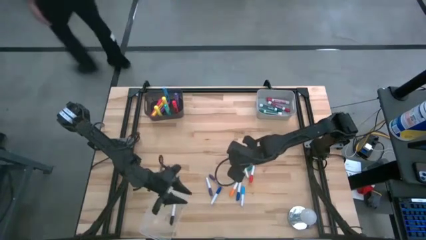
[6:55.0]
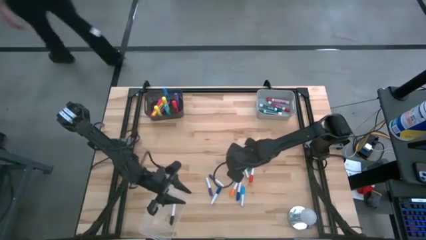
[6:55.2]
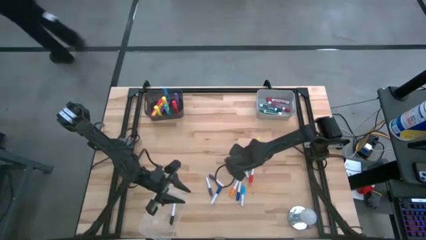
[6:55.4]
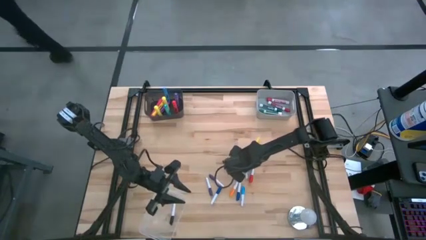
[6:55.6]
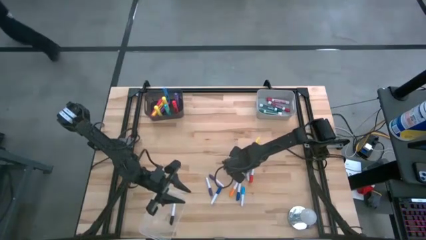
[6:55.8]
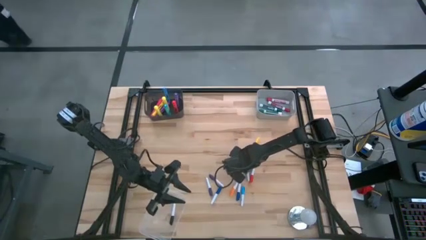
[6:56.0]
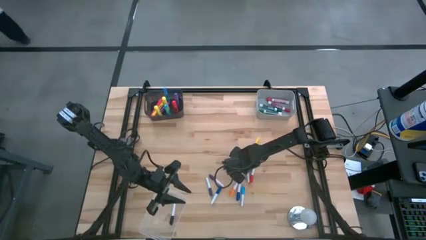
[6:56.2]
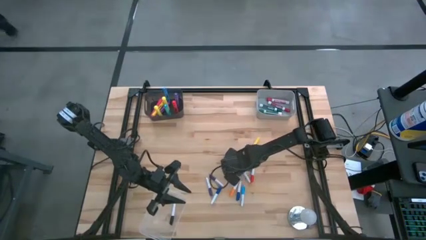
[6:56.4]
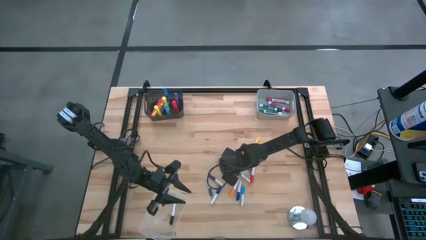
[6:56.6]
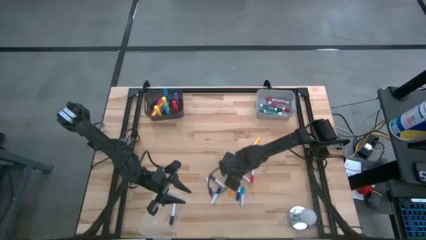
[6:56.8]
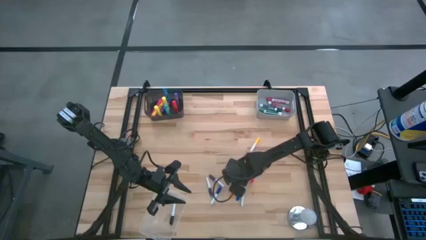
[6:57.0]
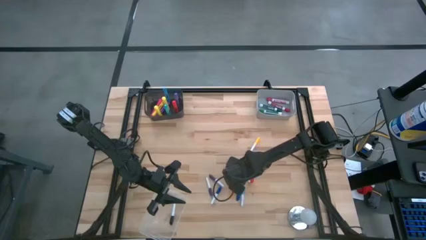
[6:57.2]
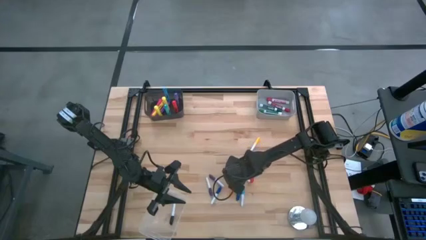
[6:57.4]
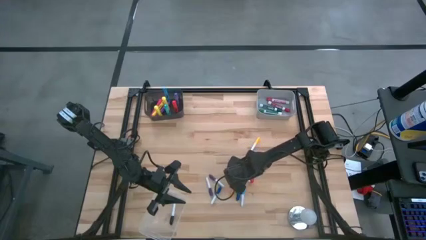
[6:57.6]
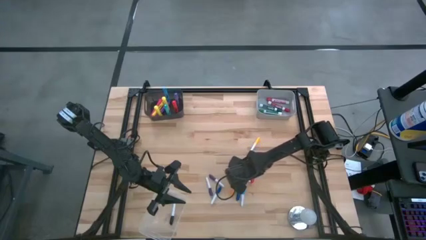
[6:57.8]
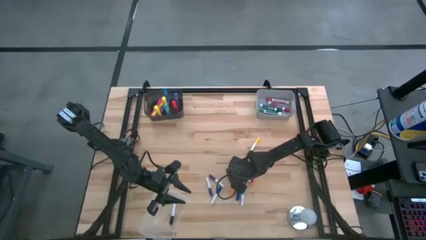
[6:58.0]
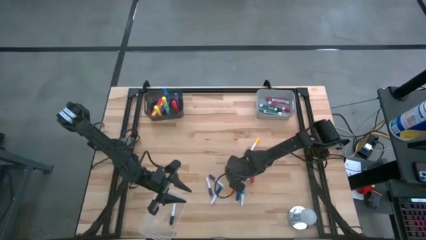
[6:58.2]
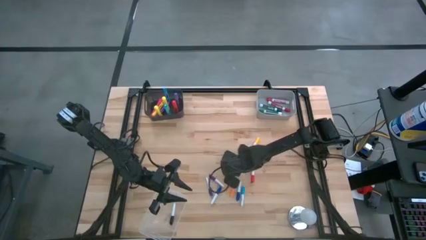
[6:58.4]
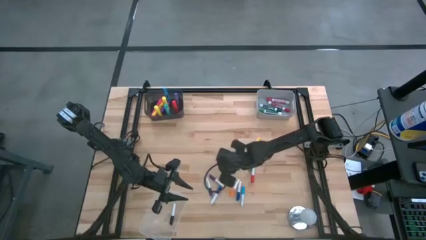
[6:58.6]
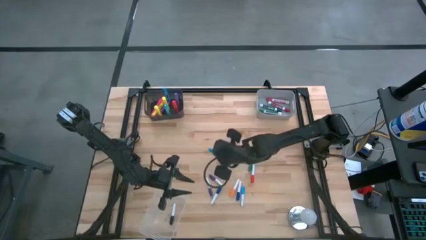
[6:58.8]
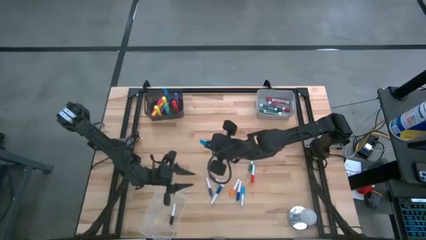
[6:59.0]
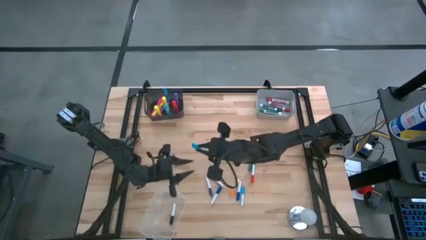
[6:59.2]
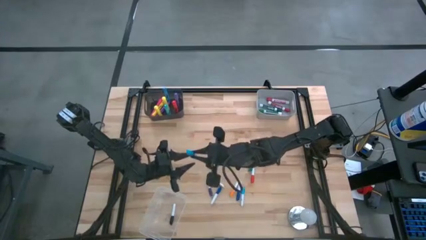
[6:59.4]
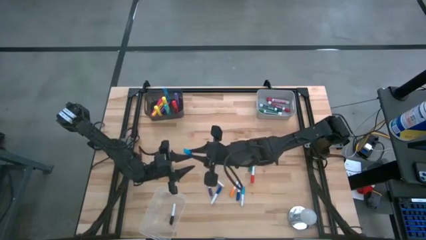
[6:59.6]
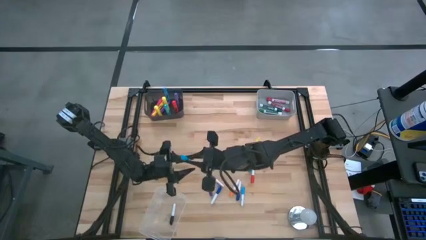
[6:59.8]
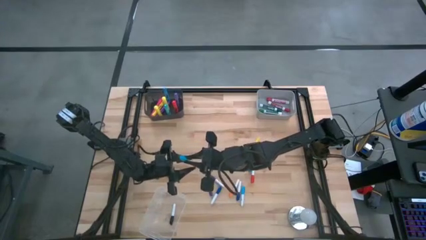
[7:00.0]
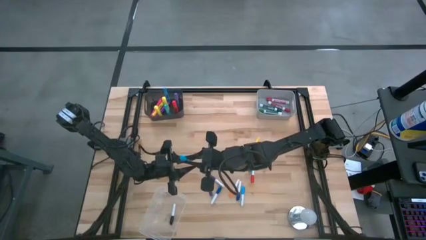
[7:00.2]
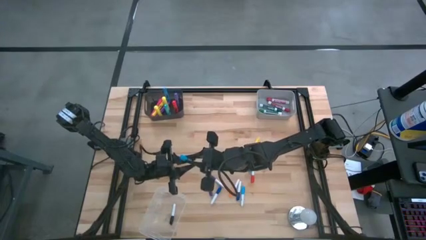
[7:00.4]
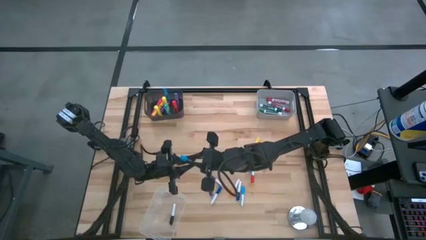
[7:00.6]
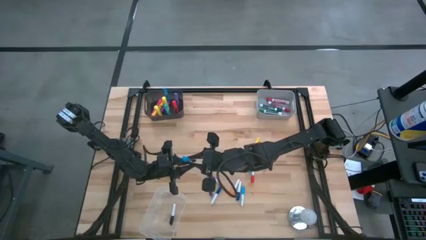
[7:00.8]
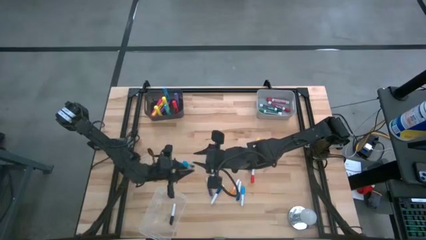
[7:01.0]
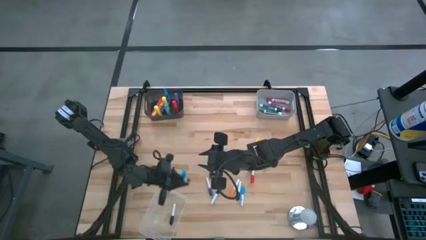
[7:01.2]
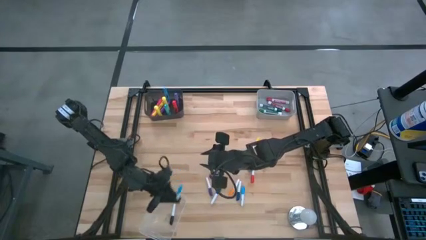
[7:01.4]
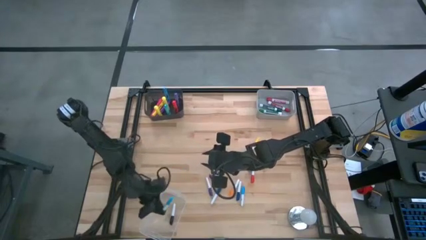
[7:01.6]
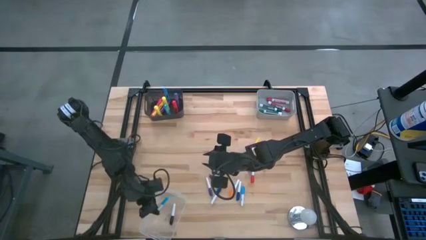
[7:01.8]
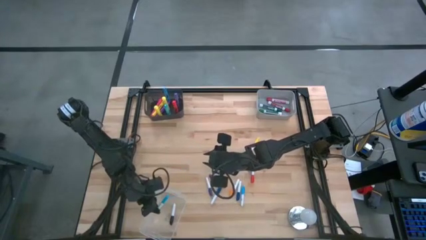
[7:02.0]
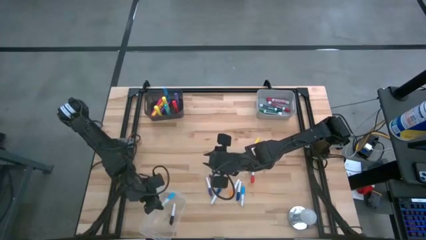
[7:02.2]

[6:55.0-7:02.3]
Task: Pick & Place Markers
Put the light blue and white highlighter pen into the transparent bin

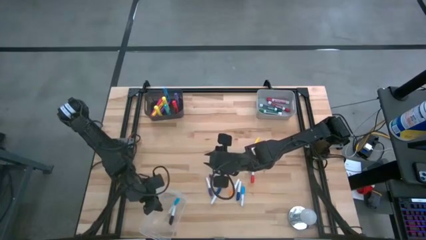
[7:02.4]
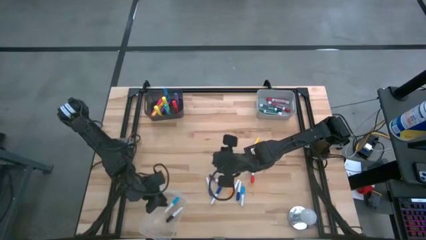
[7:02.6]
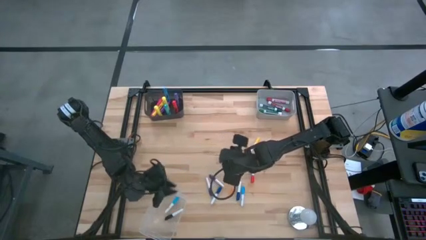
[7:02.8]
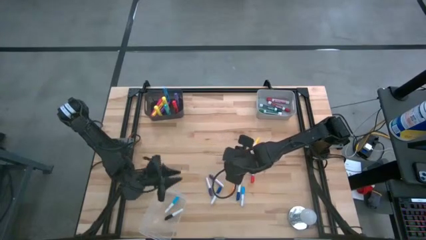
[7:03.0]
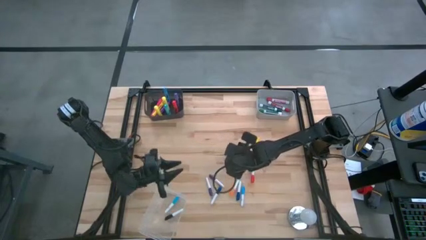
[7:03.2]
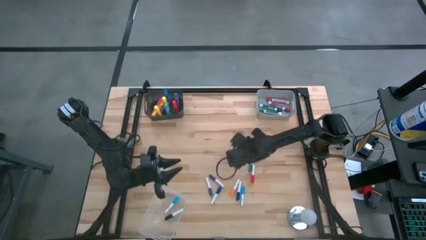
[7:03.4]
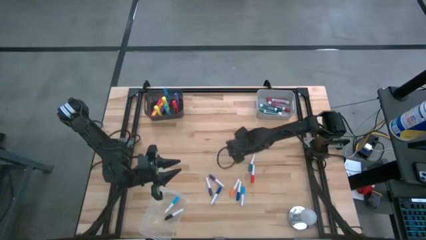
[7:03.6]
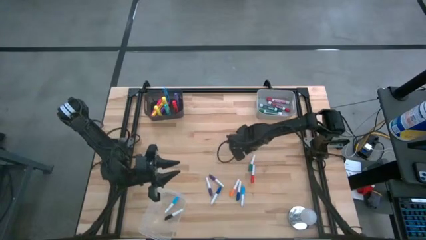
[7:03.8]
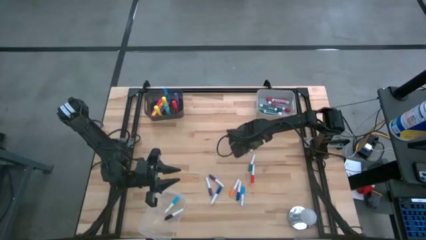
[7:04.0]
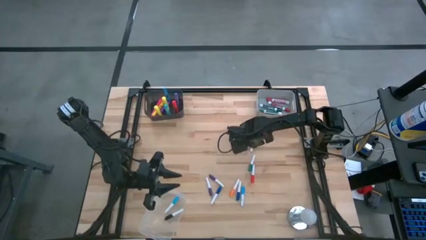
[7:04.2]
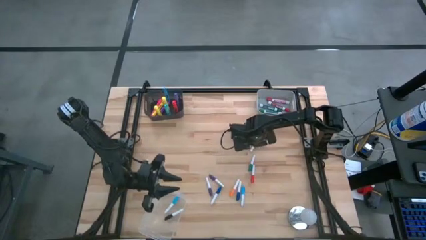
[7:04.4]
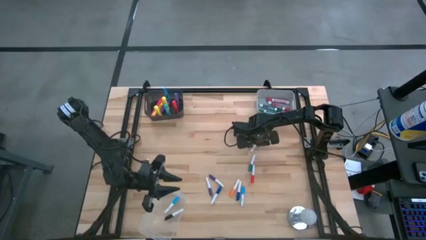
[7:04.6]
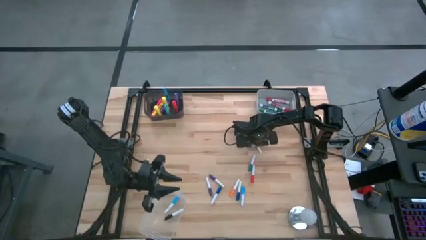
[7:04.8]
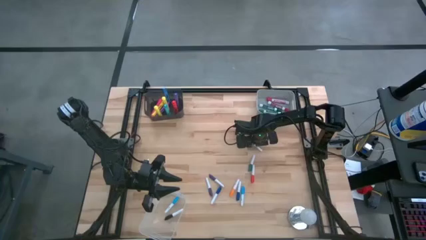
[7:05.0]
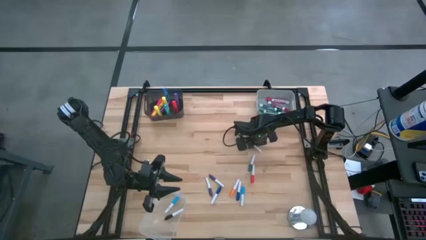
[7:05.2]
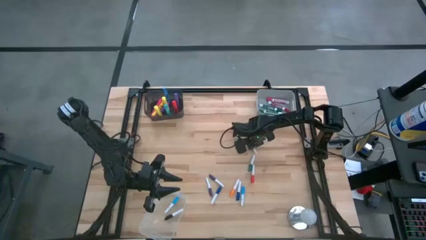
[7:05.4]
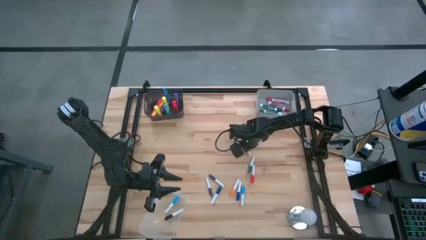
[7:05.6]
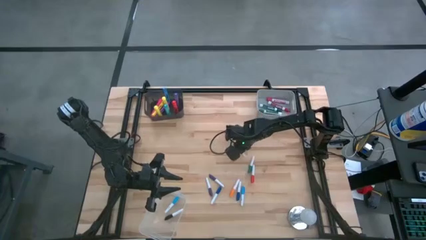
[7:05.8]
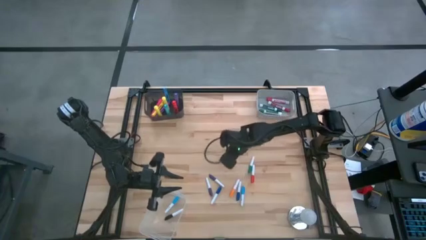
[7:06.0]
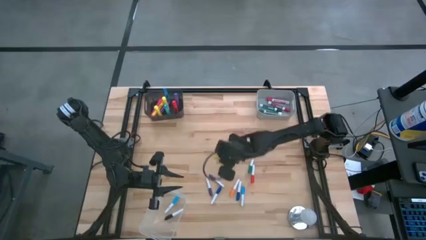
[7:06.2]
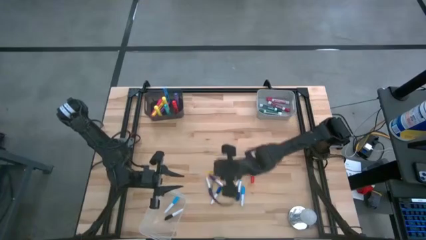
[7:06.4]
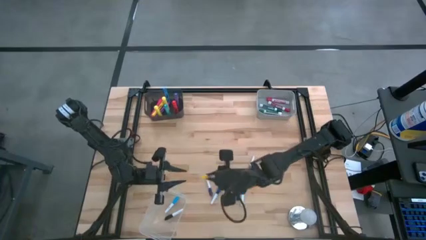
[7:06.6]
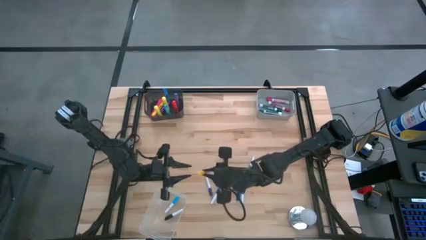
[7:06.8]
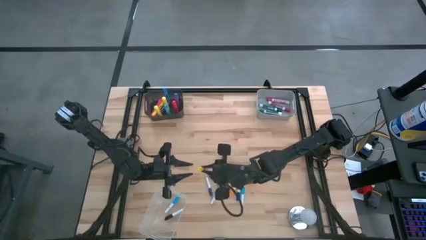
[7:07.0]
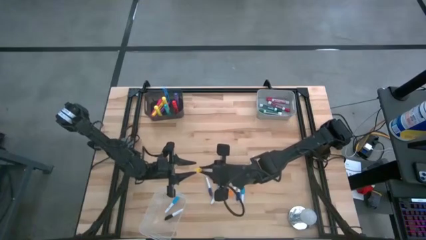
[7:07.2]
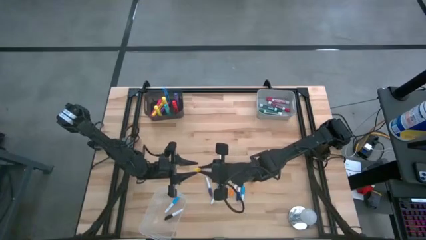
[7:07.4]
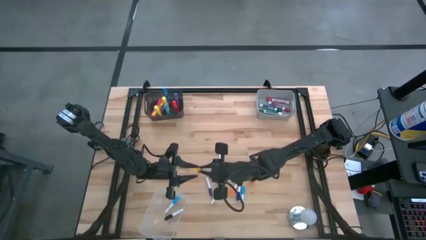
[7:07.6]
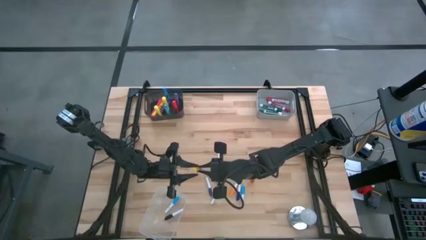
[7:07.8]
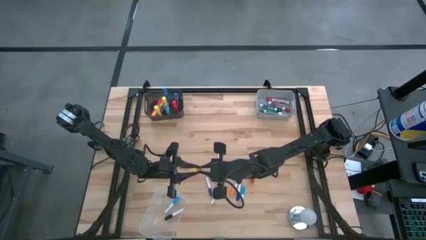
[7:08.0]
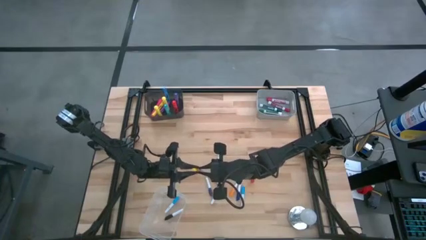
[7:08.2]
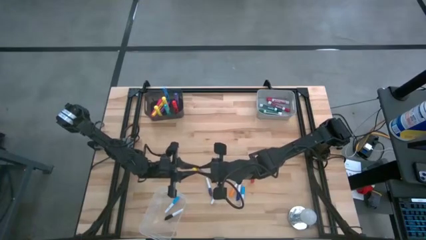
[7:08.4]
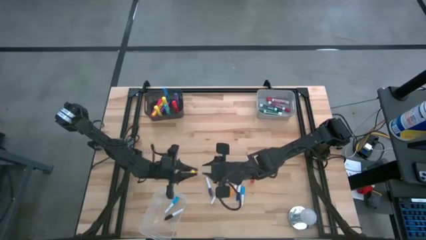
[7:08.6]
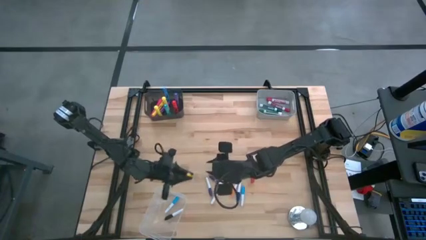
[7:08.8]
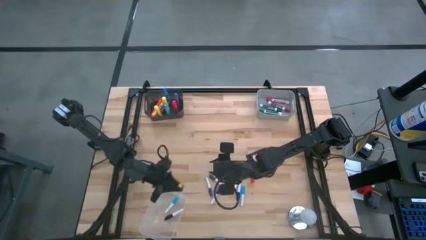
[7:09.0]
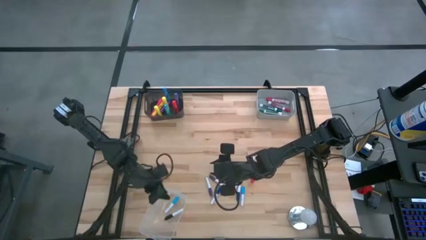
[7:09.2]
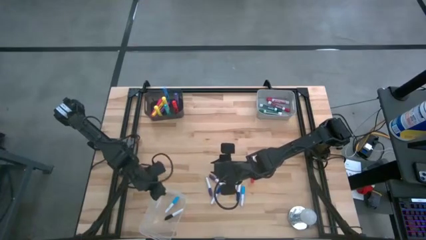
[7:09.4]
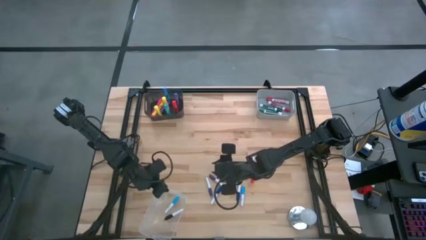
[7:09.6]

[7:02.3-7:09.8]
Put the yellow and white highlighter pen into the transparent bin
